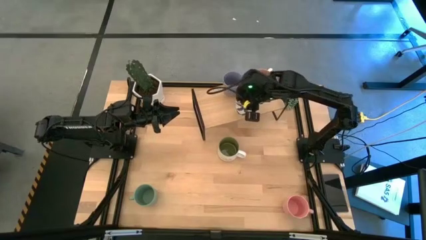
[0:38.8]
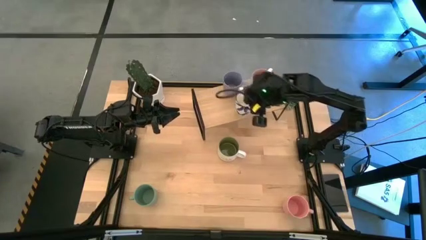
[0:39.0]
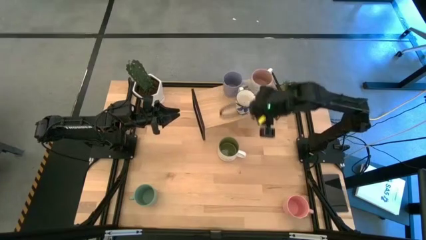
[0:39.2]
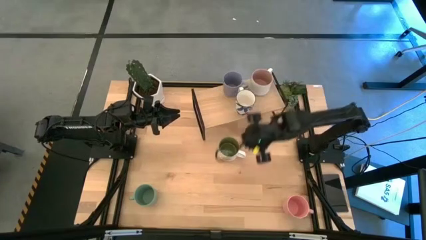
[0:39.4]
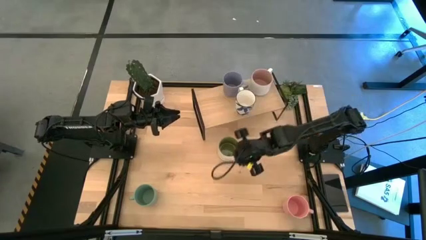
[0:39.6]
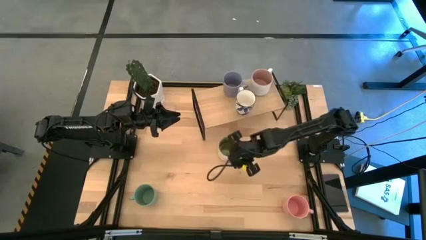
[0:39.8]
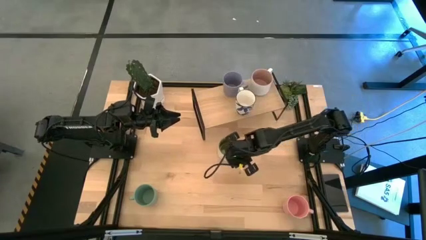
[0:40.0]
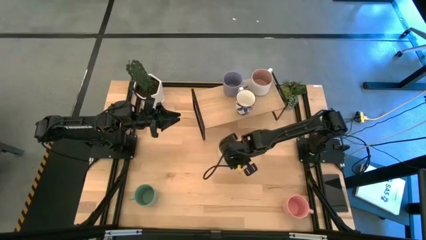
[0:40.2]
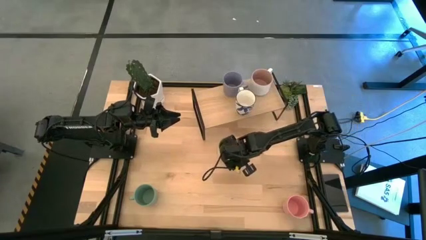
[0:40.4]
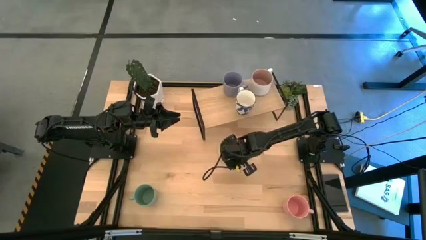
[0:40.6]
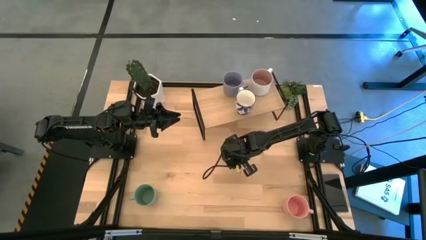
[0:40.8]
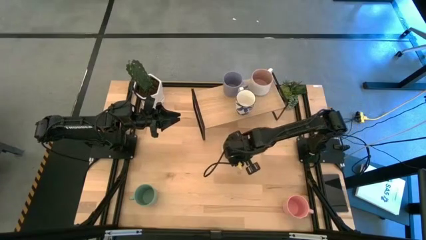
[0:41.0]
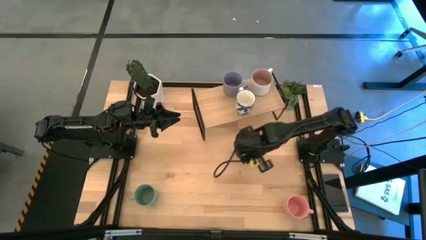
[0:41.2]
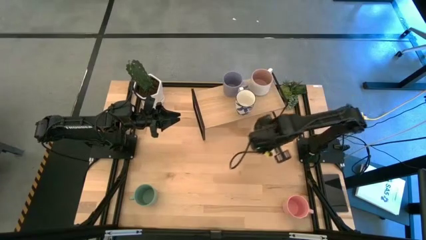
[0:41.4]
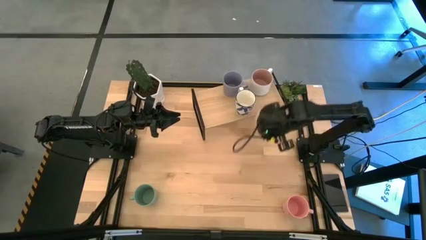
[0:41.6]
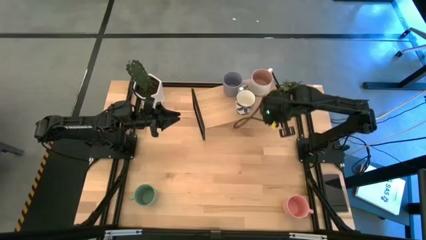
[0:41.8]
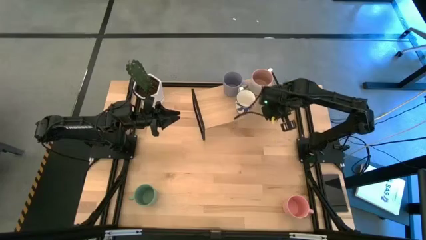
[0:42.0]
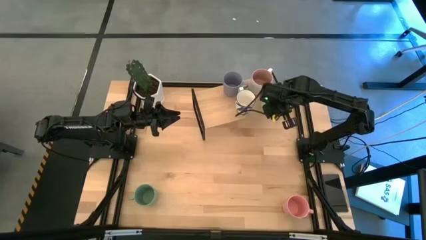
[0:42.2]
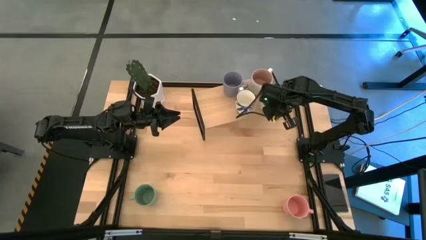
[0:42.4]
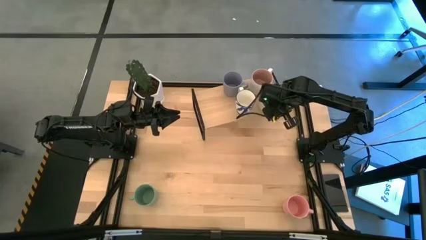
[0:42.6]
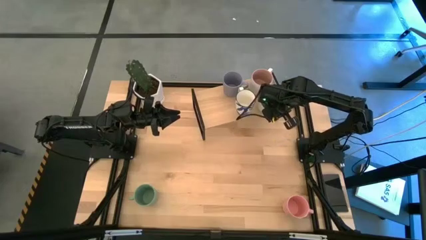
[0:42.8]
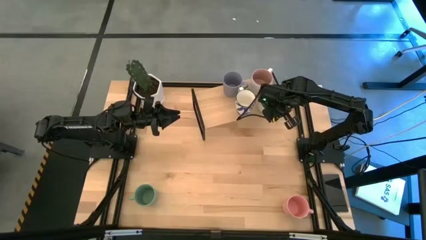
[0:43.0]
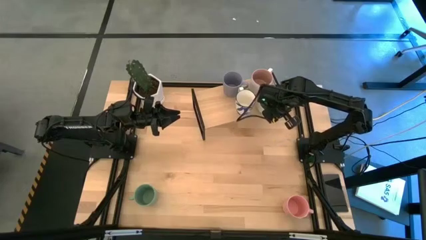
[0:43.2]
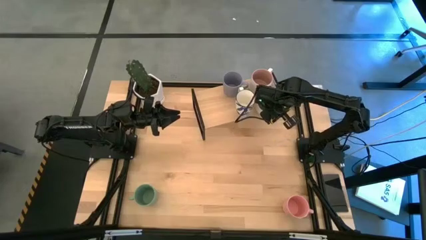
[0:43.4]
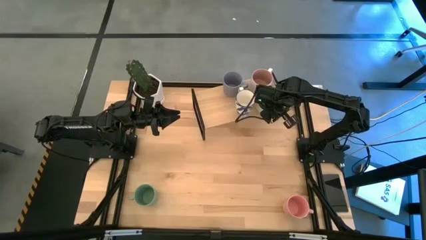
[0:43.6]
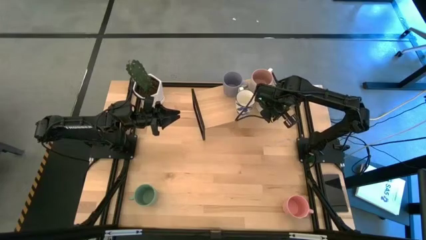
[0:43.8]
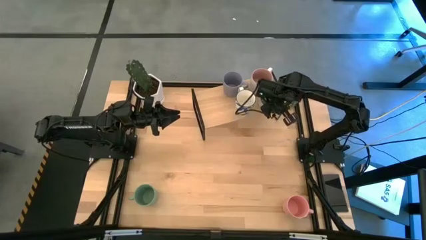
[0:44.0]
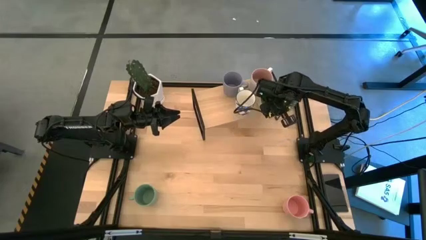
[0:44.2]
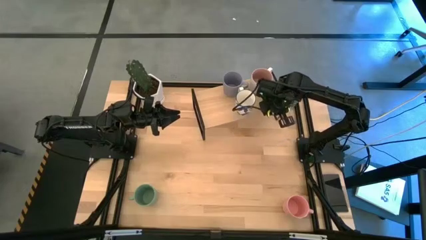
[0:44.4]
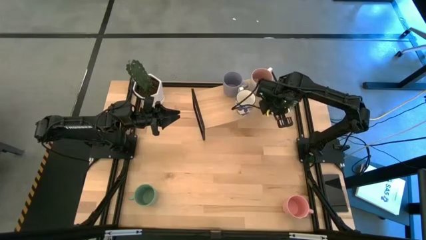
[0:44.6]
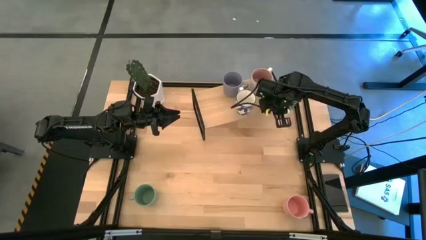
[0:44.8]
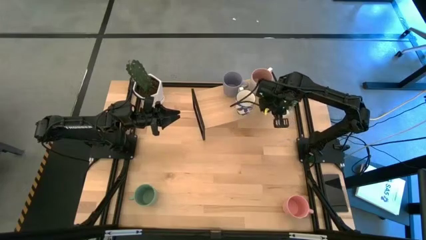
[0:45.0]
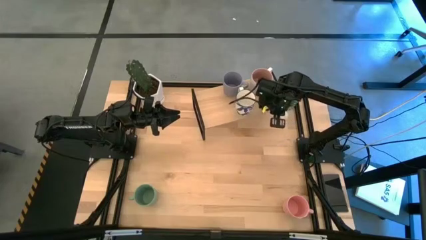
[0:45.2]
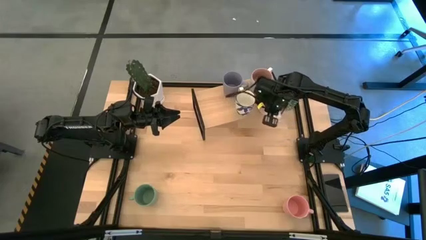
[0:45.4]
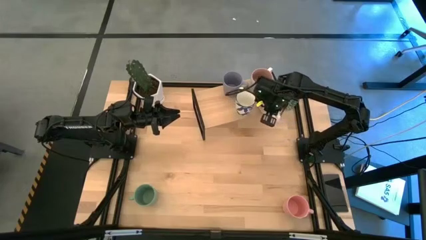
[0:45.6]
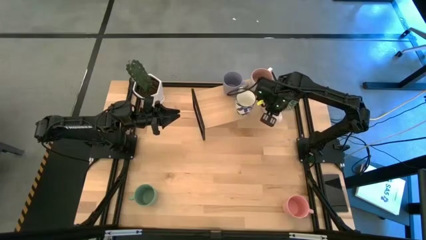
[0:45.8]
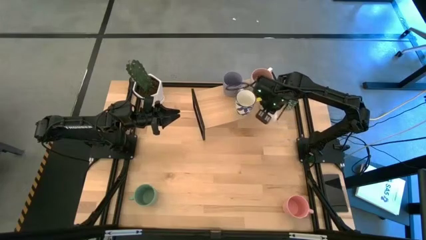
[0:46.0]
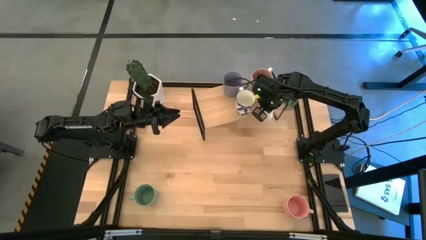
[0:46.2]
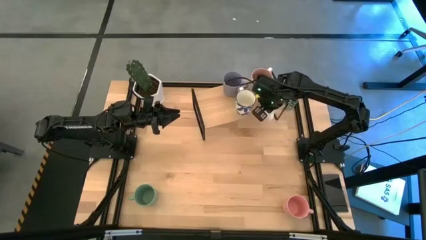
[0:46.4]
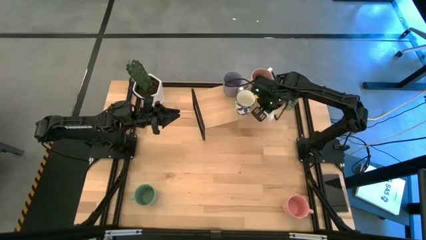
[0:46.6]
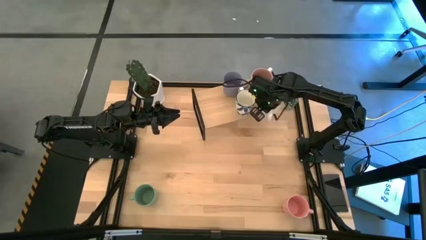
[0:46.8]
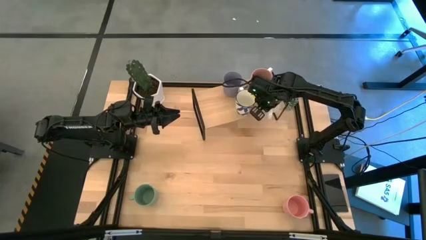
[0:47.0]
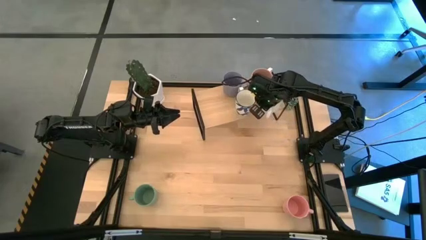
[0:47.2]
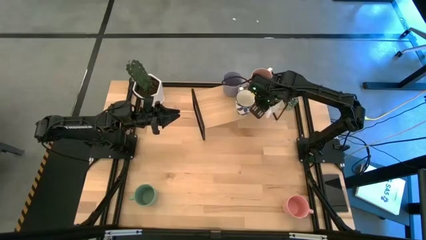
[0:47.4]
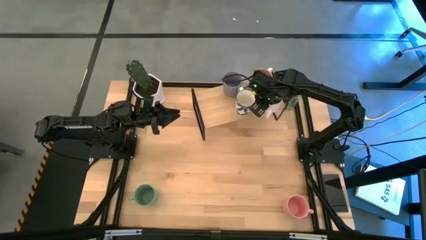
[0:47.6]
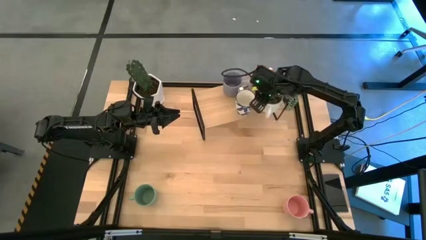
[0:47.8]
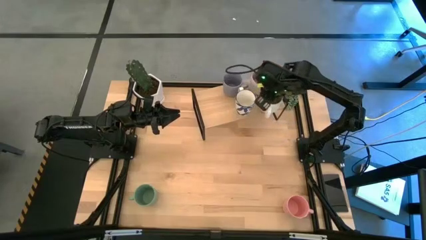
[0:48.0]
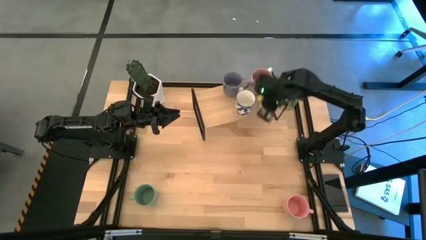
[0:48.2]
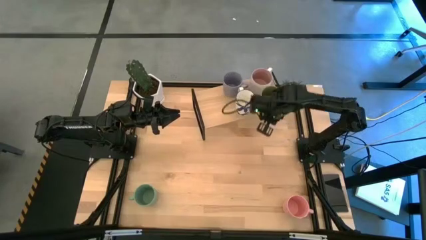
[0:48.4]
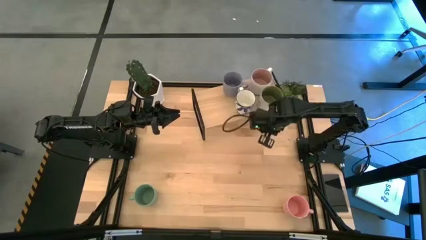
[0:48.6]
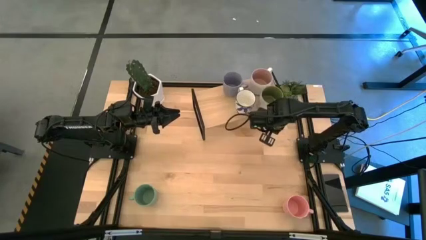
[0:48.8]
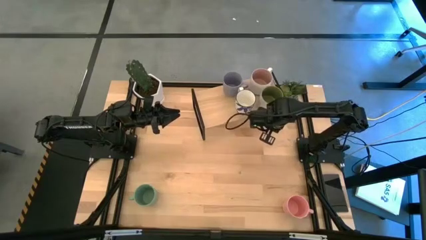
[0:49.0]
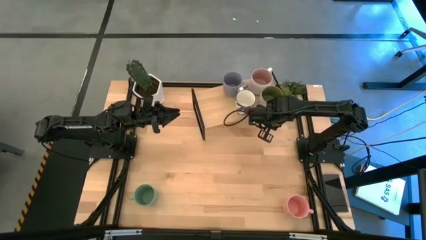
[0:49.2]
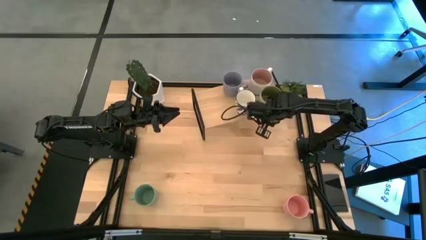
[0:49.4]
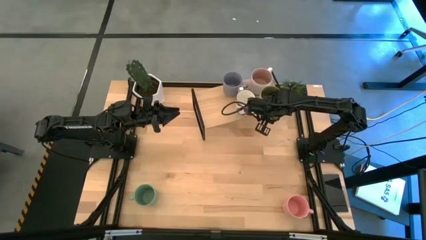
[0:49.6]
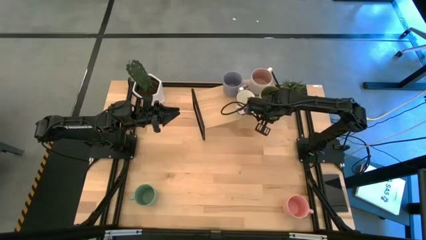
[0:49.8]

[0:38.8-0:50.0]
Task: Place coffee mugs
Put the white-green mug on the shelf

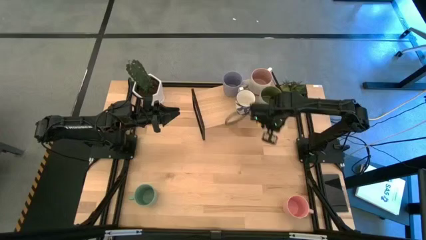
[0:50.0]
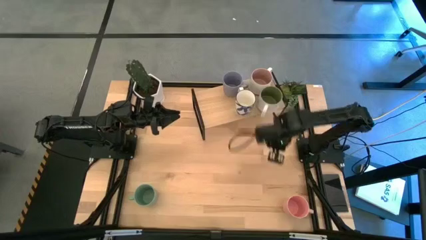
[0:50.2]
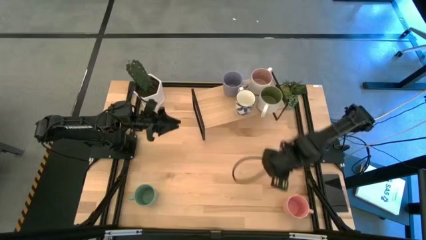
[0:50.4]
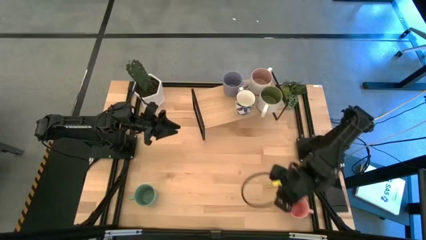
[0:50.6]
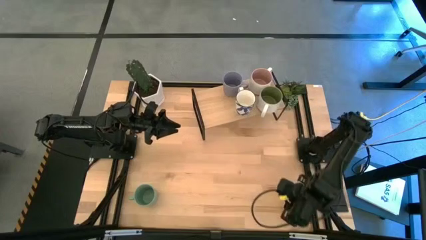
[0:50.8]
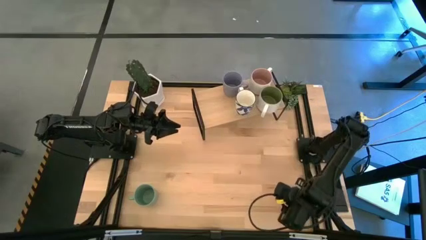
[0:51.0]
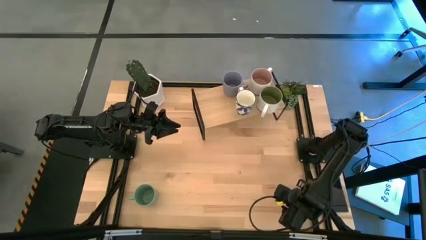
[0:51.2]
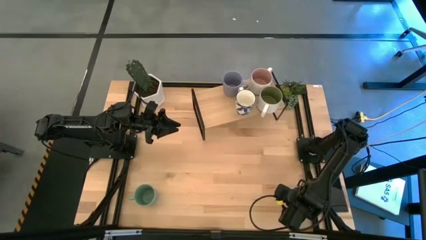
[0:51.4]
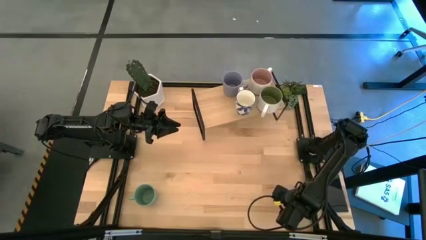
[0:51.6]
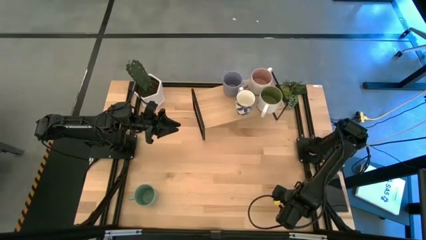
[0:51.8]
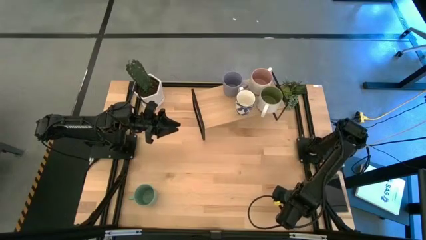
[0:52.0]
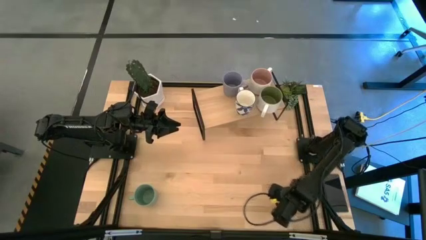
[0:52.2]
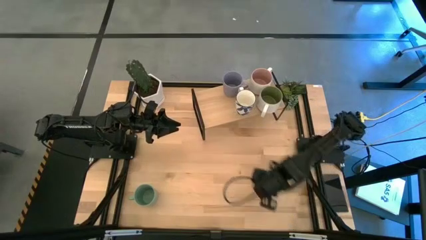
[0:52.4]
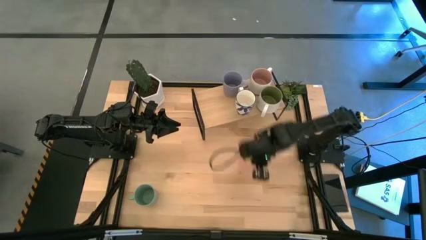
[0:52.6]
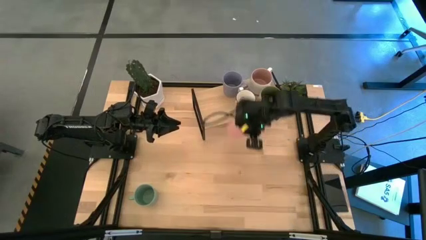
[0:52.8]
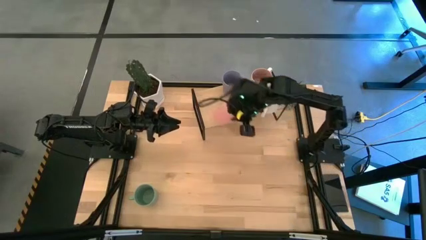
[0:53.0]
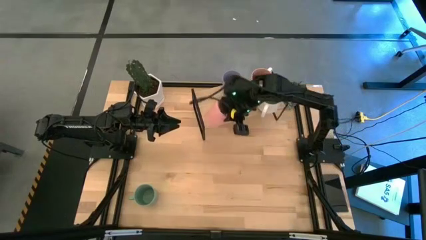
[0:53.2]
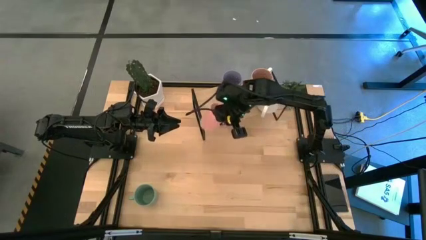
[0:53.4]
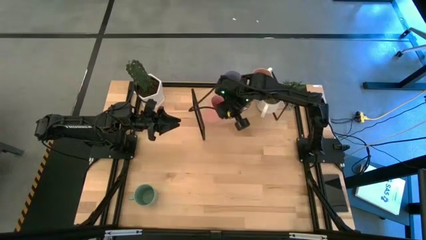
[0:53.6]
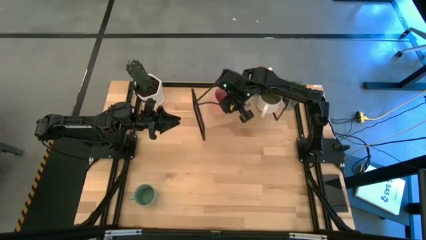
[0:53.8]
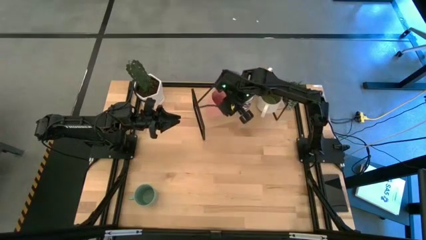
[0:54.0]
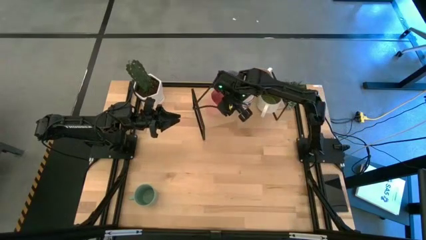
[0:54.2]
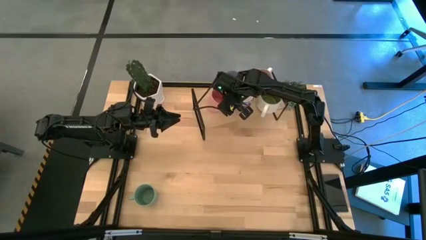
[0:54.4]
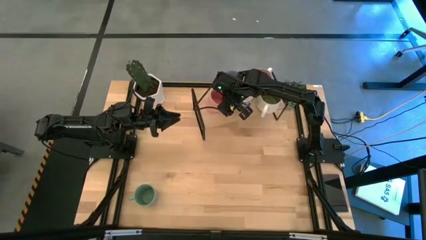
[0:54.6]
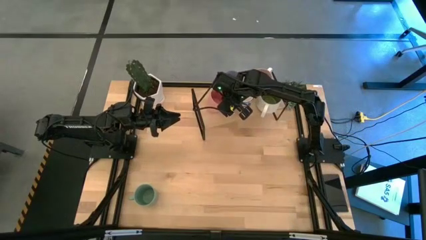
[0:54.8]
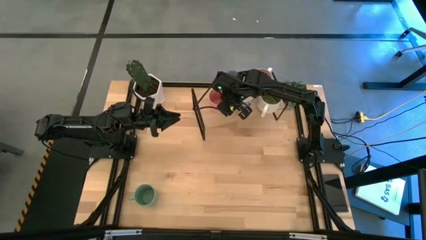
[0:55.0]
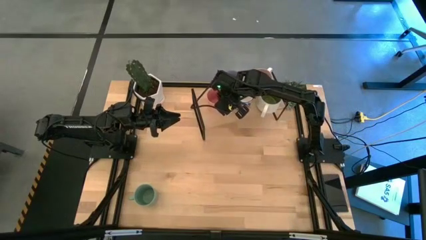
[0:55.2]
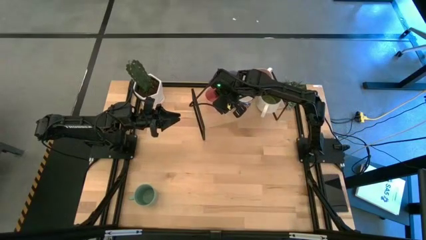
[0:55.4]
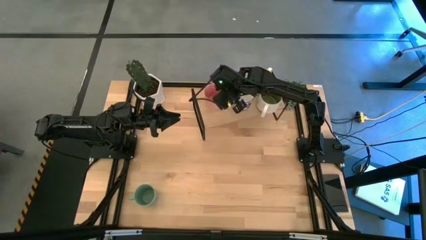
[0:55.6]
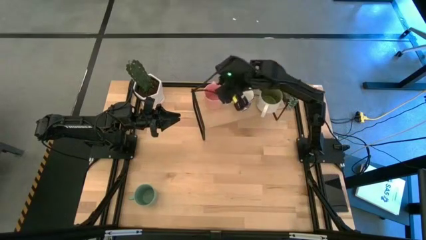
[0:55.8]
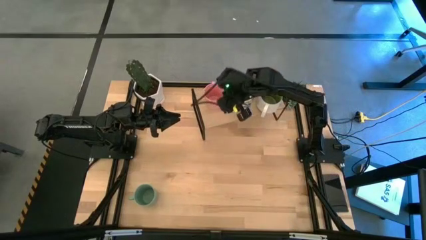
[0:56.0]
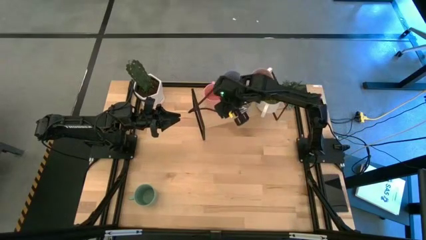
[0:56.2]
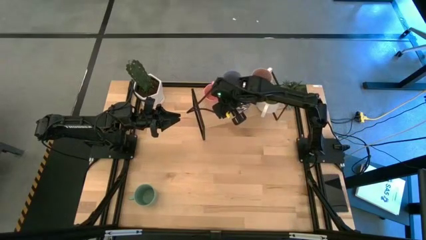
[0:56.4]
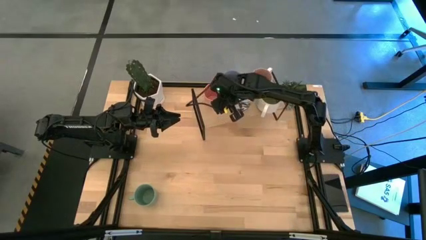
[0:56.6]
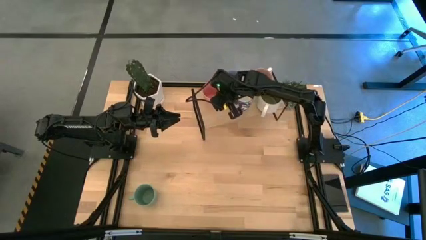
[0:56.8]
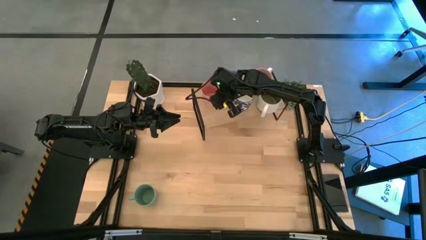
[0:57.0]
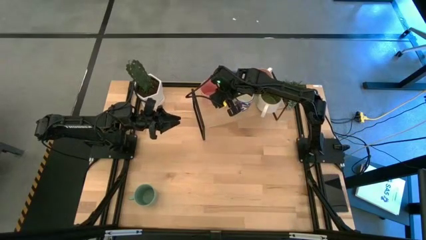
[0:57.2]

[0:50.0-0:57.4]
Put the pink mug on the shelf
